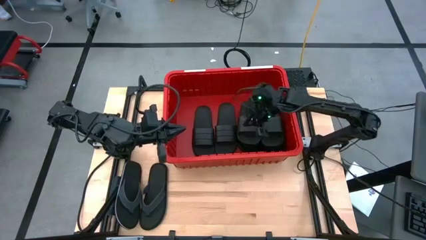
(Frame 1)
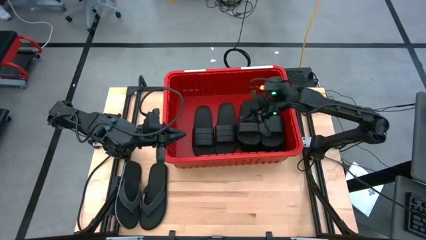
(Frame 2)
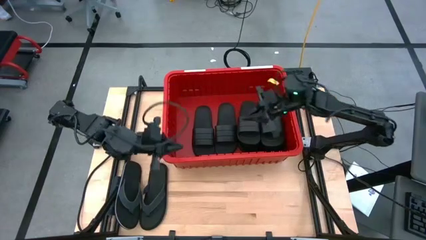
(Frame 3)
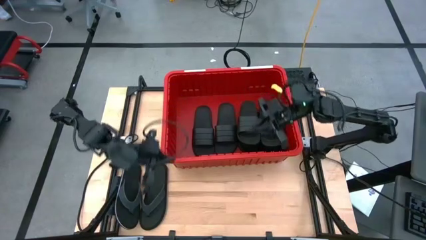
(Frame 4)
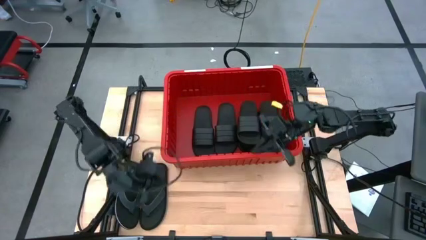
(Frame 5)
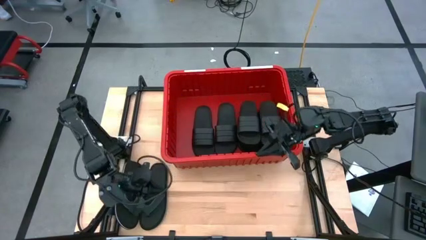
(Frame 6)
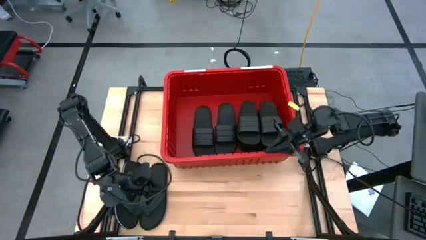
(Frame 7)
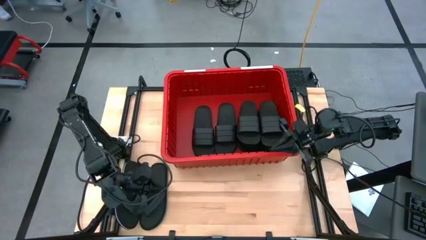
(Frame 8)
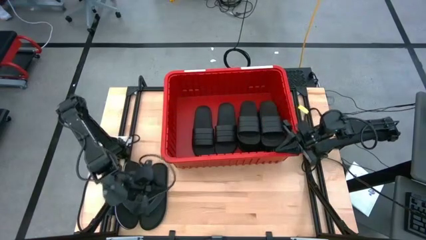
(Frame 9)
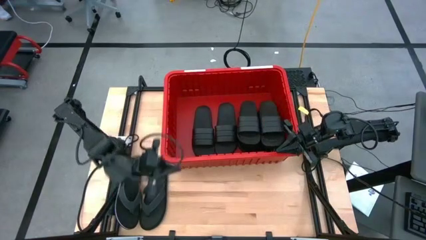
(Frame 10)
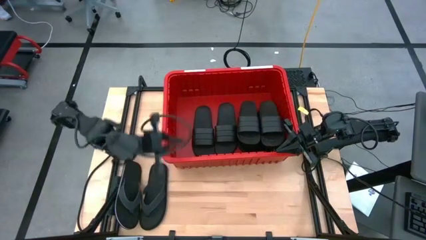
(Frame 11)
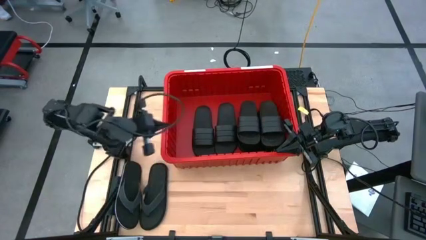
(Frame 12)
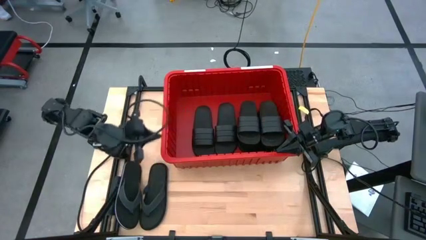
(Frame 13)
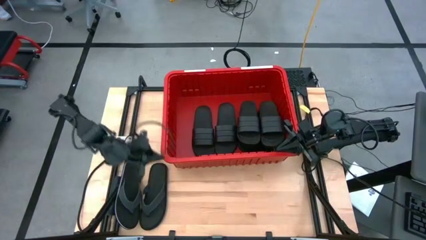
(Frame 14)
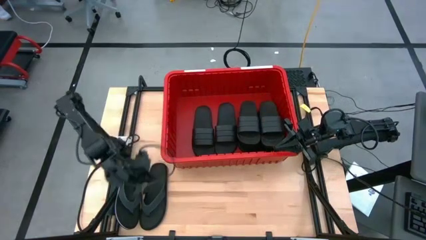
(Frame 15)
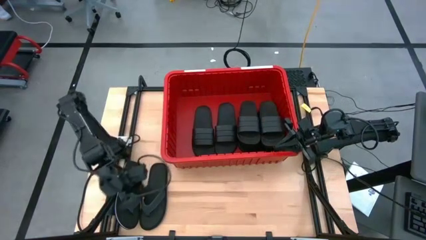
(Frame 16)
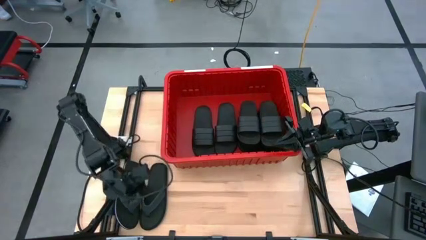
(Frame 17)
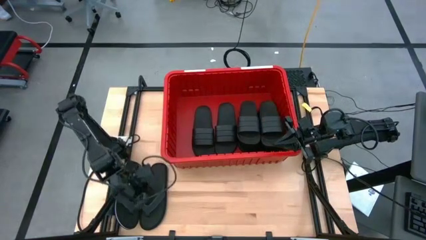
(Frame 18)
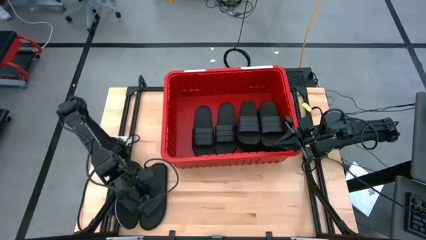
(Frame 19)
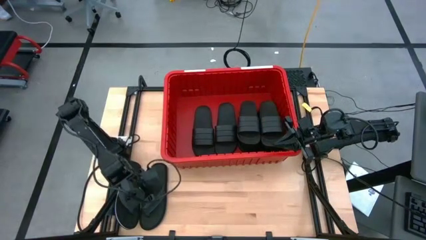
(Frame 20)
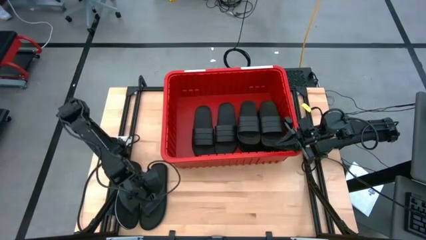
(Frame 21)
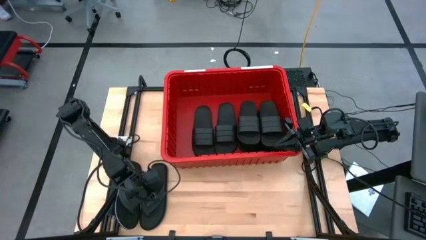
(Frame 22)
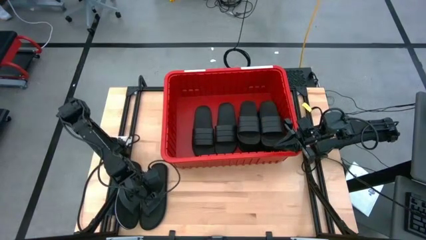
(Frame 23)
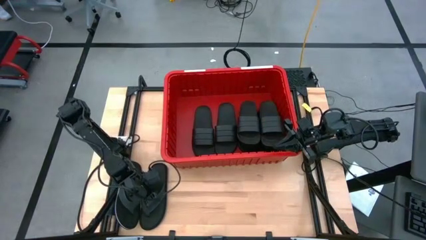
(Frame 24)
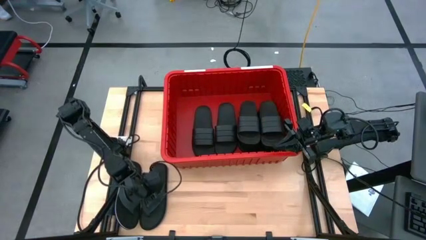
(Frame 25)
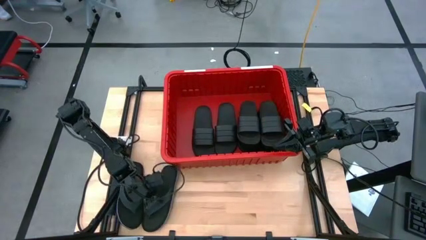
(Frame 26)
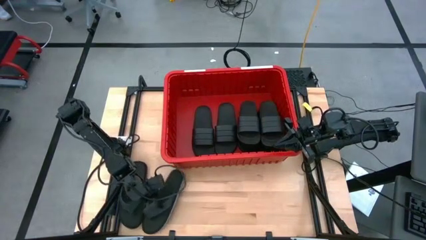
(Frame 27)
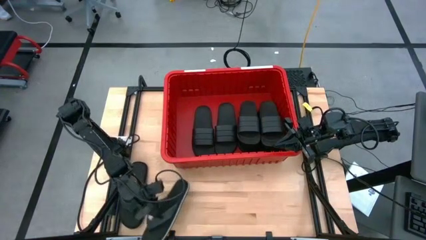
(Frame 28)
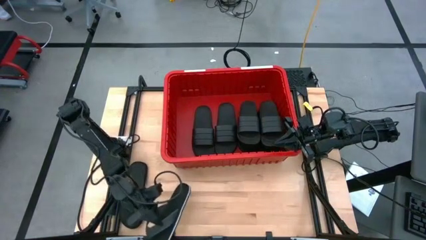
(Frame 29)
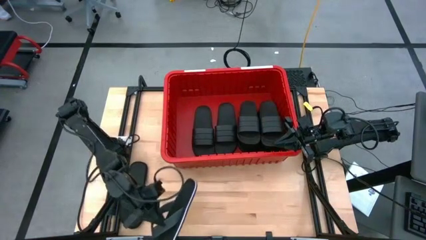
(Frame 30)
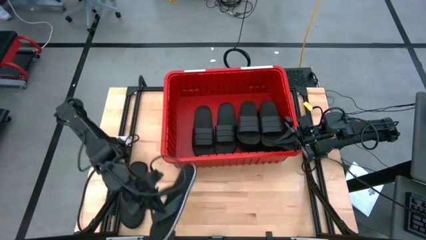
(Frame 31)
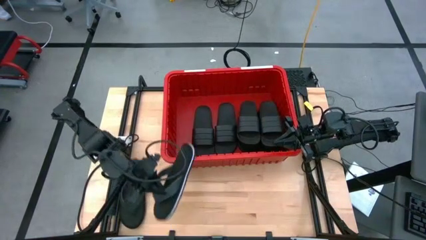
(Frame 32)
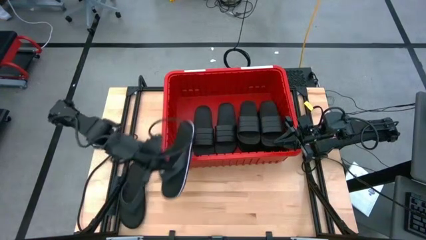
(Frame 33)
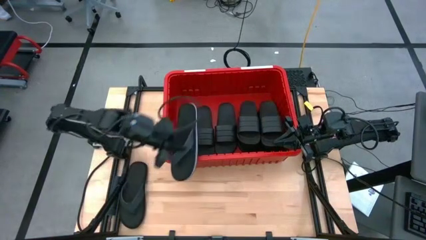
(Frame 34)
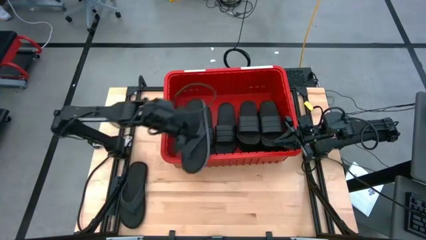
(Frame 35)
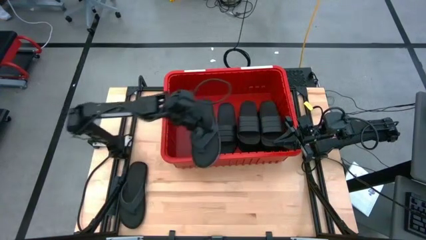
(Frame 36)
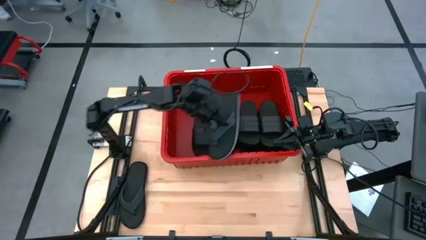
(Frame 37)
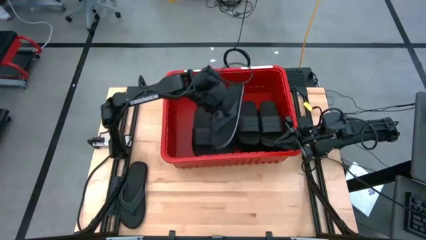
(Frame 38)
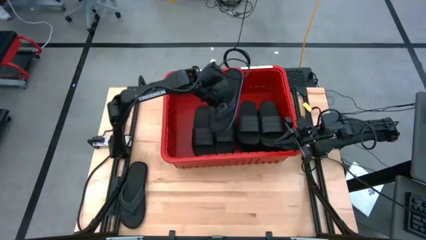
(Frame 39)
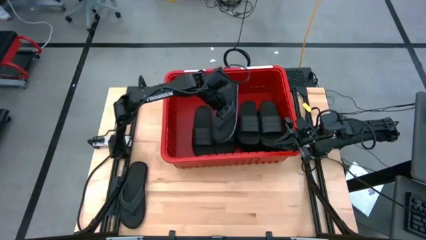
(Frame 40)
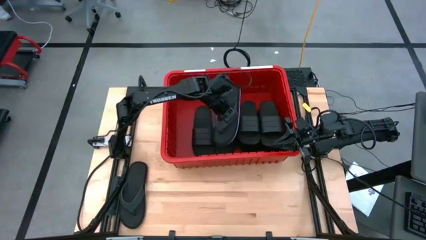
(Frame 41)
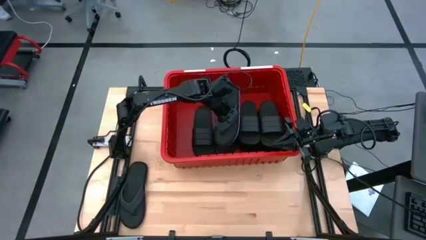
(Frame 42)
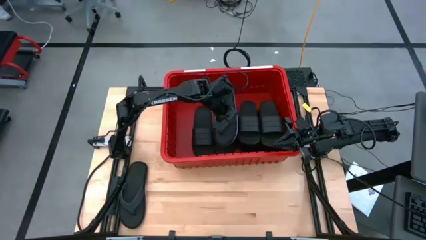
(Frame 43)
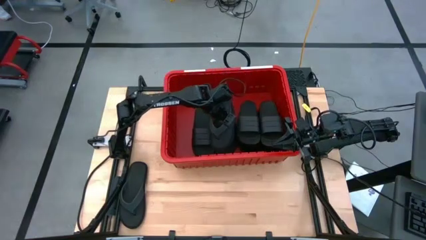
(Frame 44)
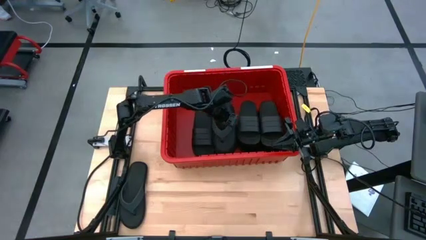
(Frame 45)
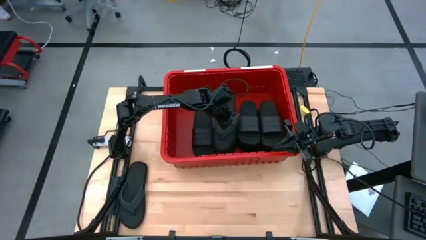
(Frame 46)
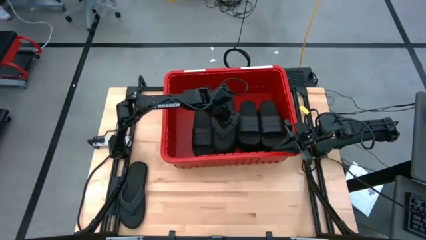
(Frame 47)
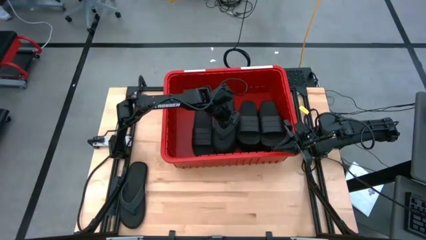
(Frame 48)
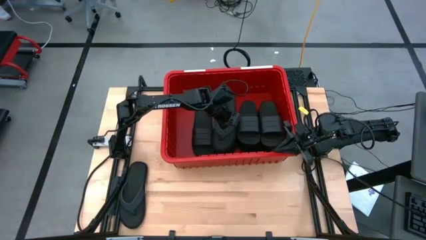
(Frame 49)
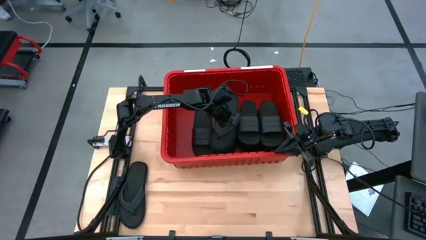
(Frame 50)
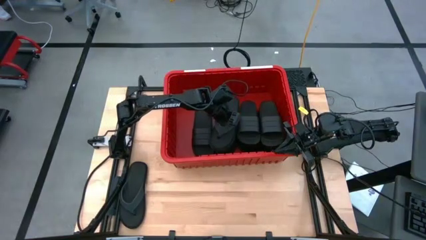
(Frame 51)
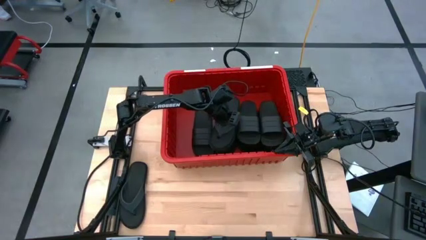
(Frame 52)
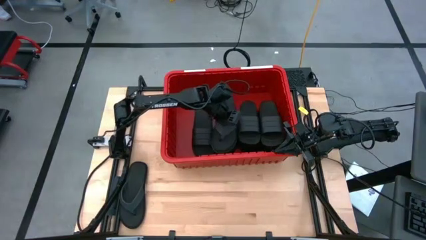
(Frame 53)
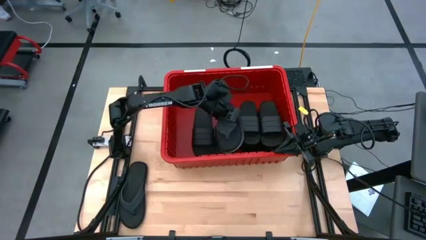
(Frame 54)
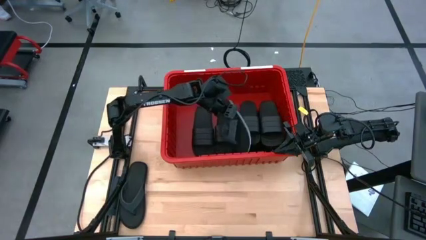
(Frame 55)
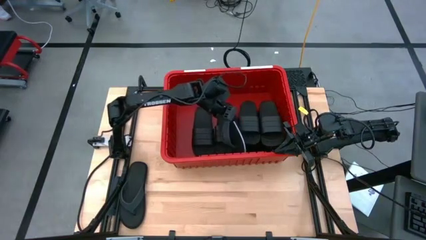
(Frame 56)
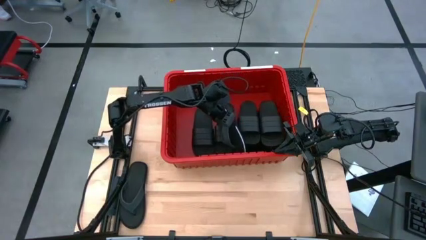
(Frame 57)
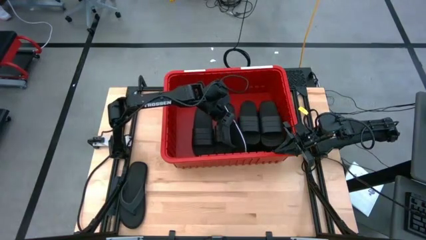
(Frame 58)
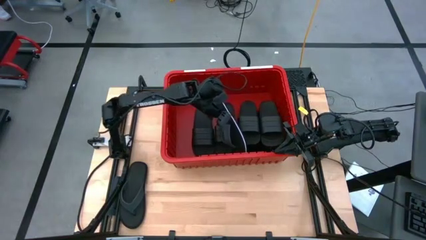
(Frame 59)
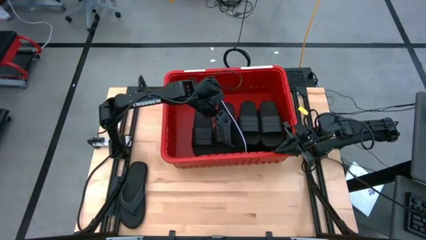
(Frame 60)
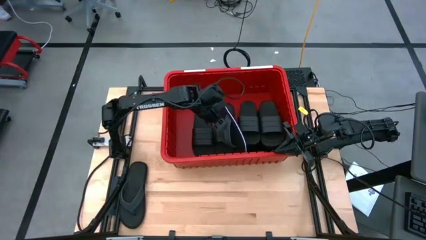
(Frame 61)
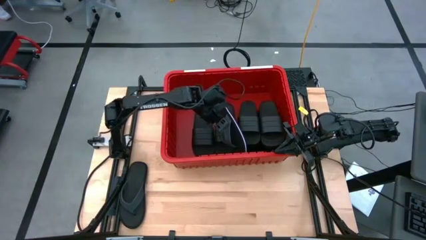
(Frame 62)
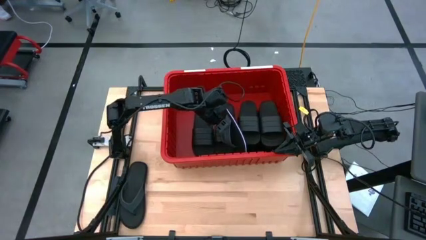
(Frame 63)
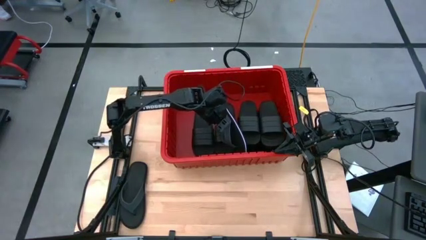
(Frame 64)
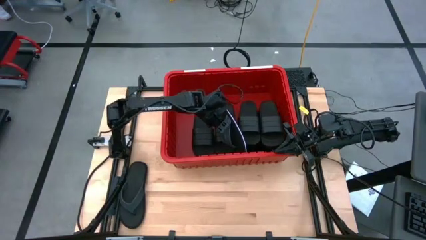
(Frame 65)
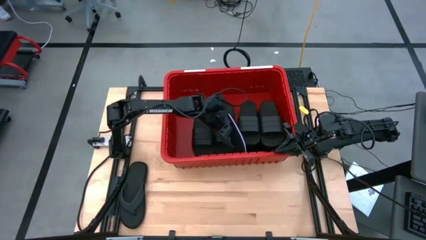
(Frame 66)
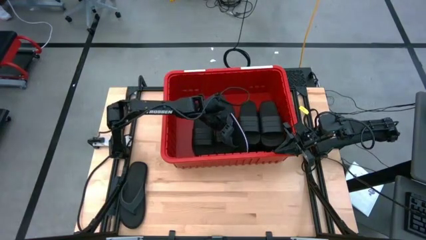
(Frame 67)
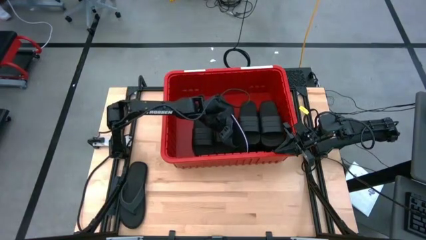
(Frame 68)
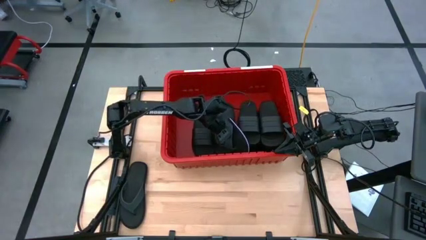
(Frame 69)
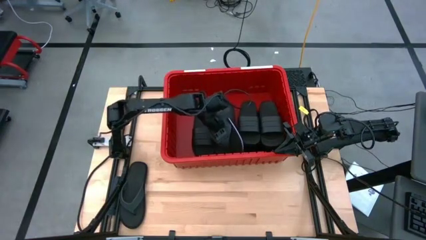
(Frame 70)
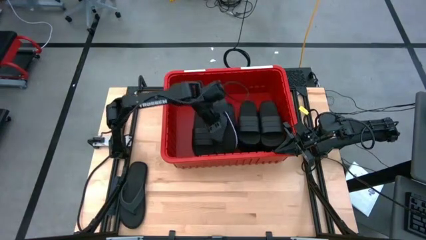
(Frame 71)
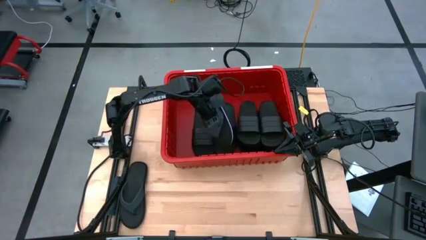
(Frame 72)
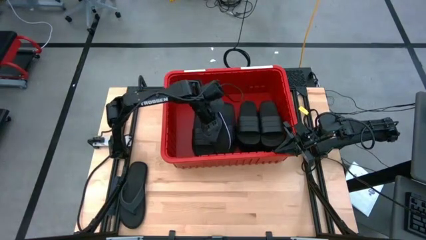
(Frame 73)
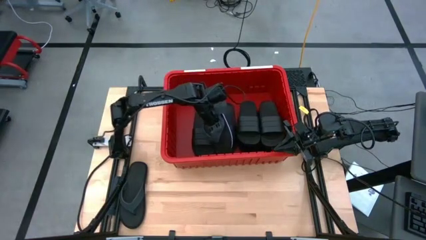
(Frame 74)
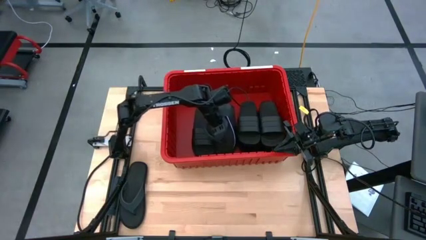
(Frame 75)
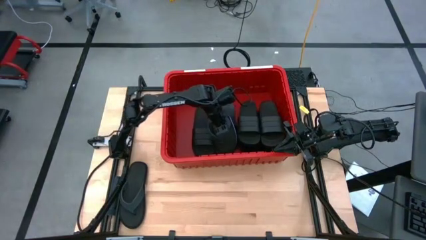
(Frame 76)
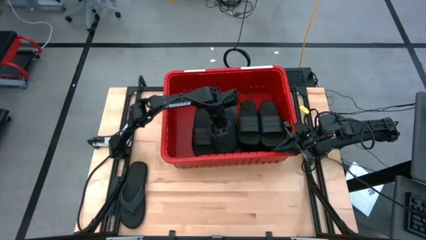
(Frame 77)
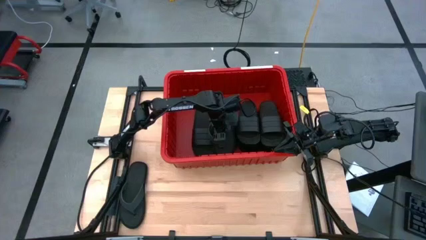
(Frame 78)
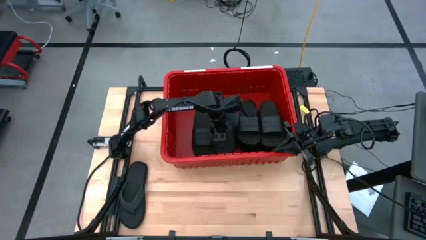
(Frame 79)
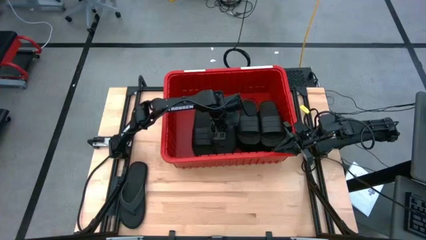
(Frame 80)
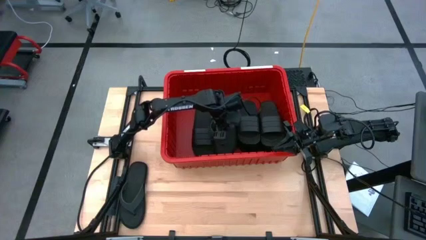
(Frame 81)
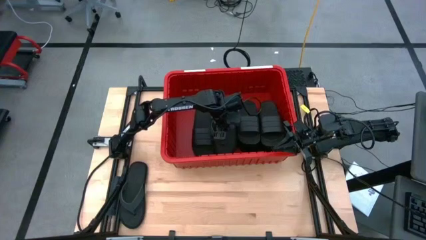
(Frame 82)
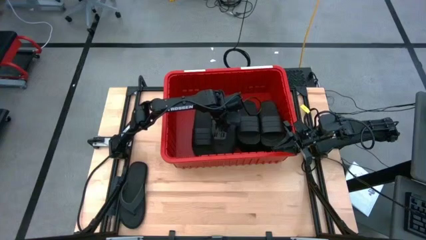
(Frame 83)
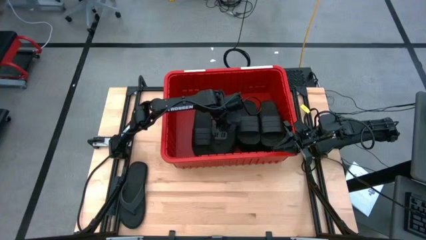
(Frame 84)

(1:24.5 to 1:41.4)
Task: Pick and place slides into bin
Put the black slide into the red bin
